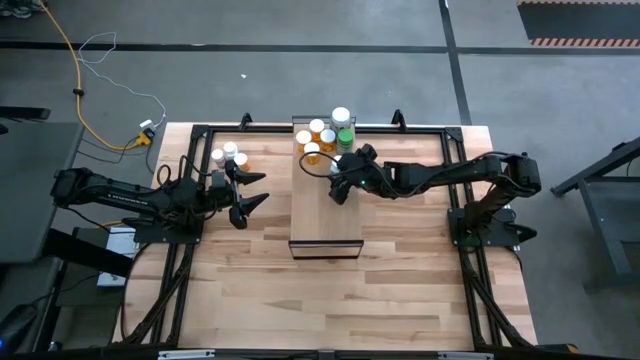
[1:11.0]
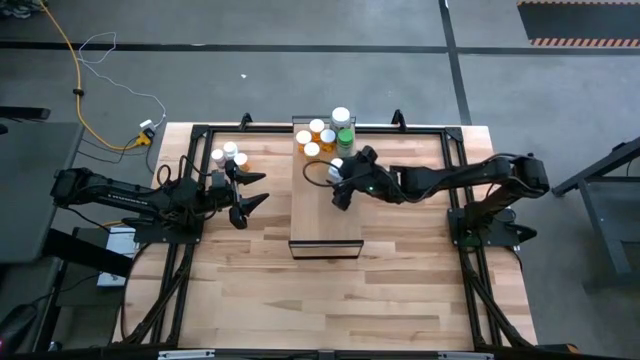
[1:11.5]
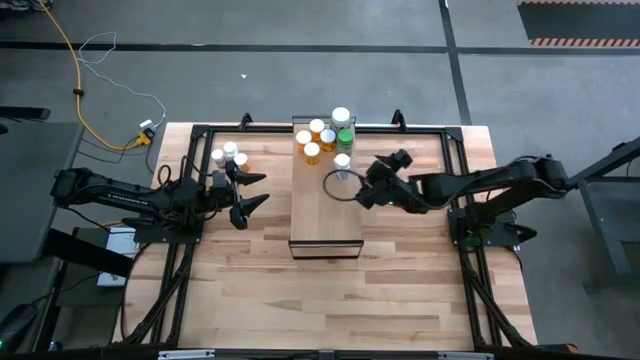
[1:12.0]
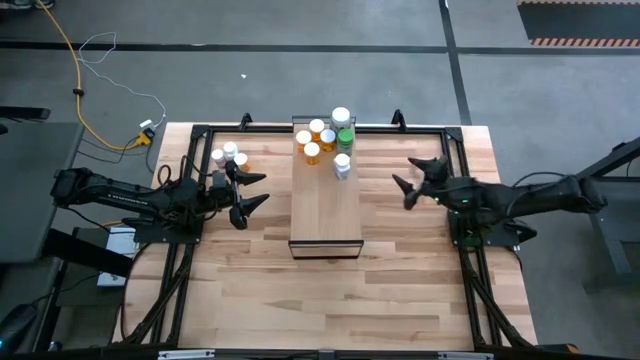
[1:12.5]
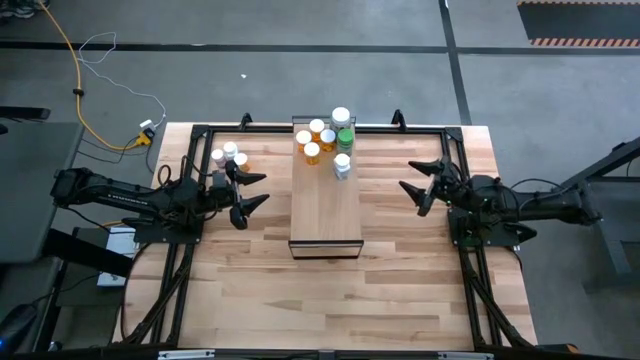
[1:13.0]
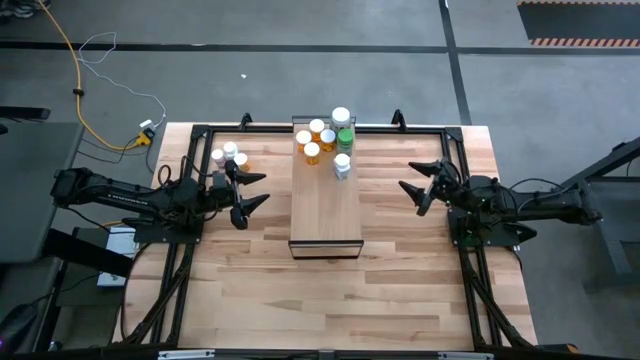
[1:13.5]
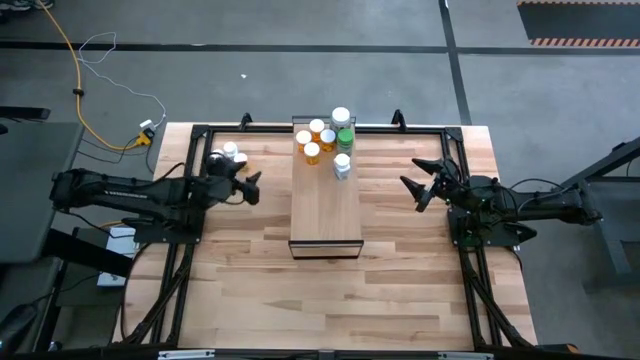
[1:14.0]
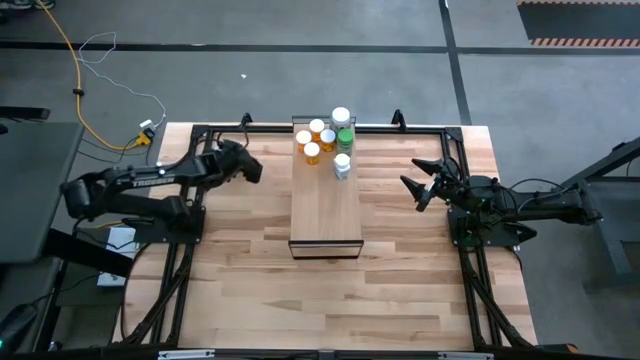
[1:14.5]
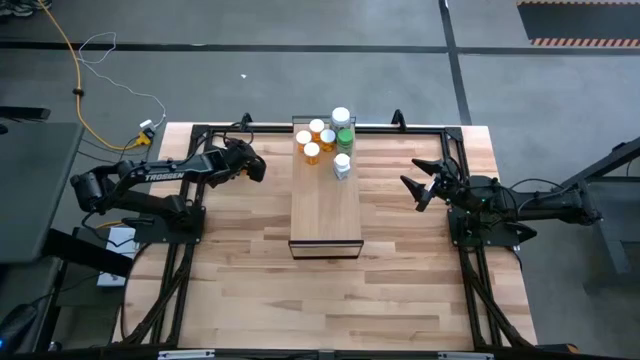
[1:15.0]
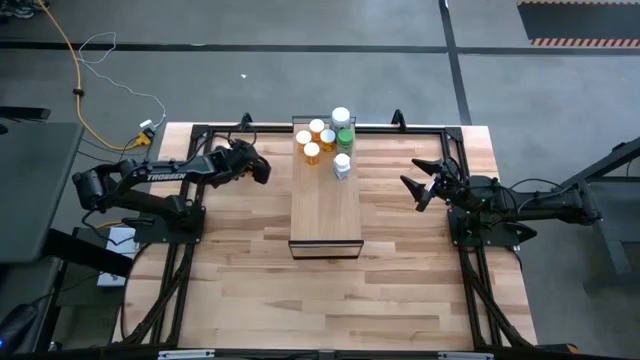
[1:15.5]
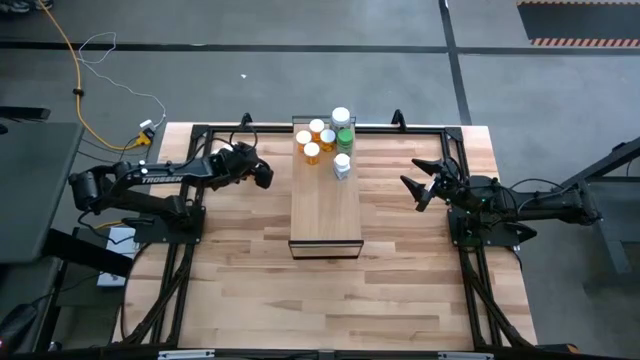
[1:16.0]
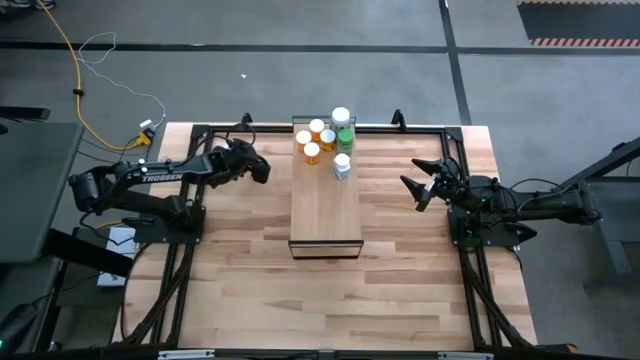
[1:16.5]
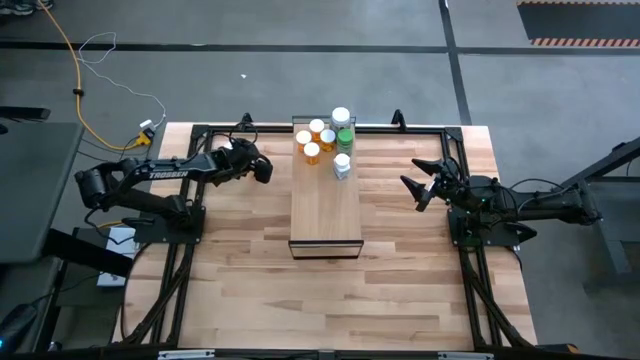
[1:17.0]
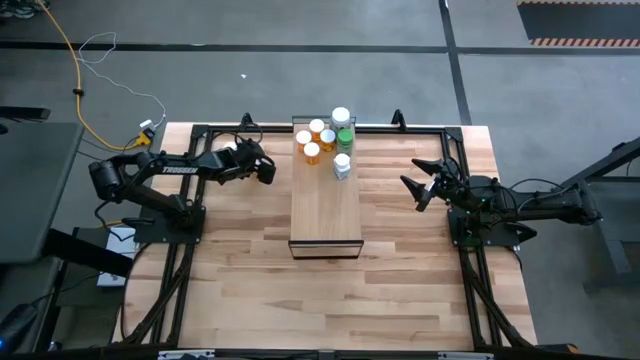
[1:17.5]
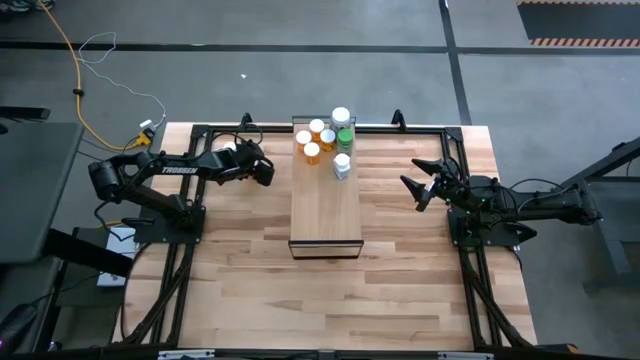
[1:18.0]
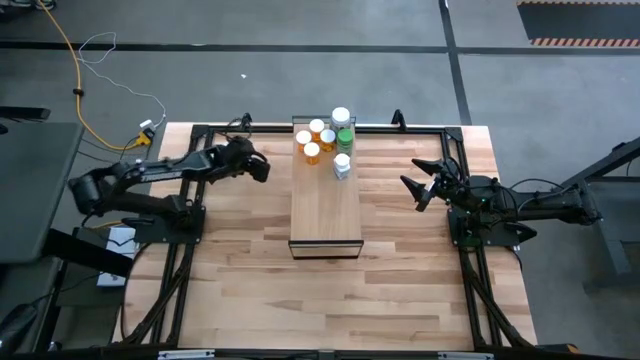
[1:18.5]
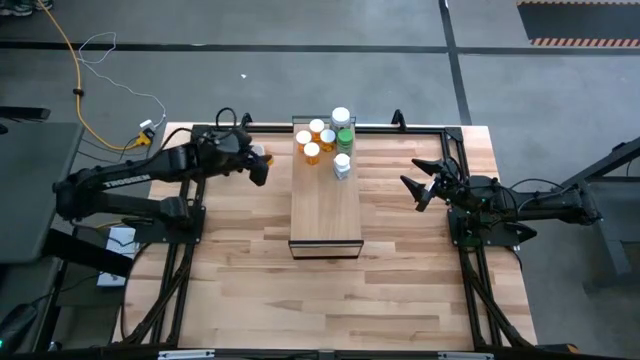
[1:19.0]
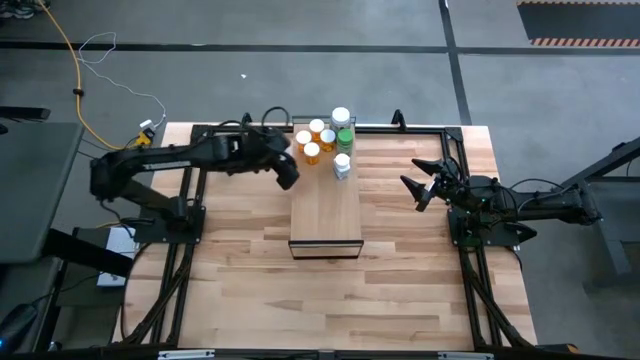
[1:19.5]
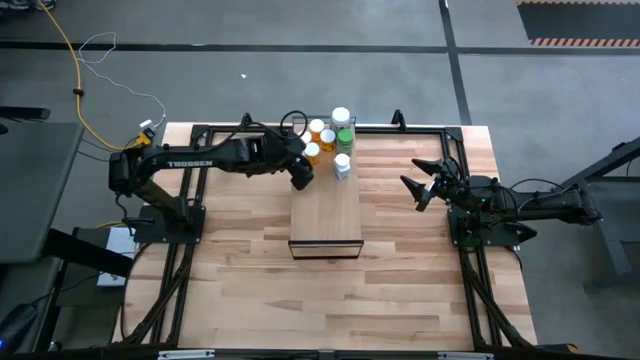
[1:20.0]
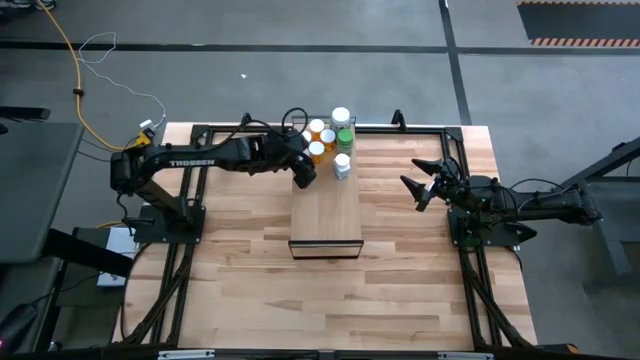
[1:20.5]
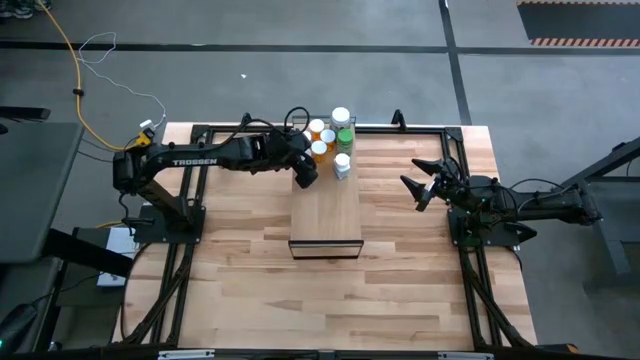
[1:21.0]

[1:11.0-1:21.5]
Task: Pick and place medicine bottles onto shelf by color
Put the yellow pill bottle on the shelf

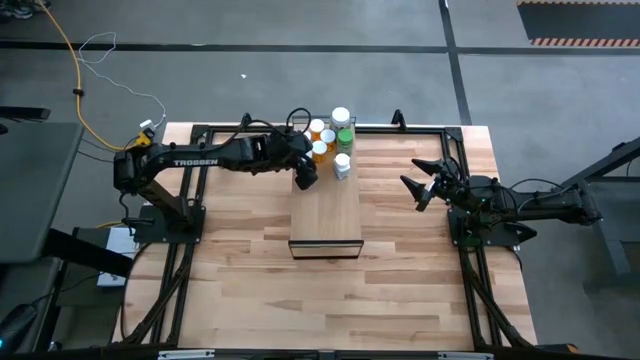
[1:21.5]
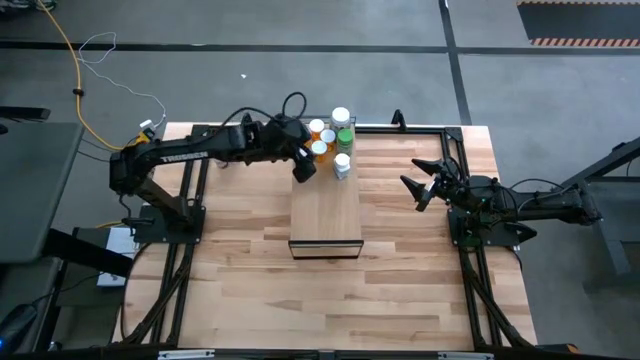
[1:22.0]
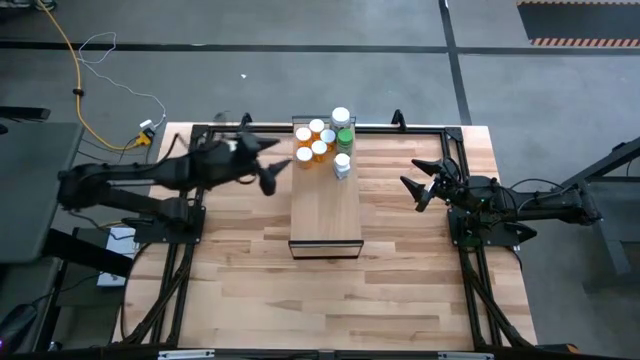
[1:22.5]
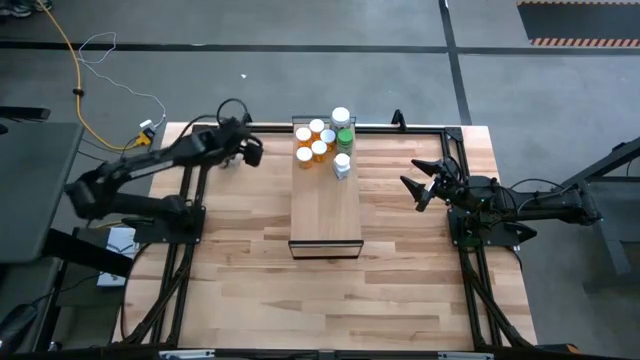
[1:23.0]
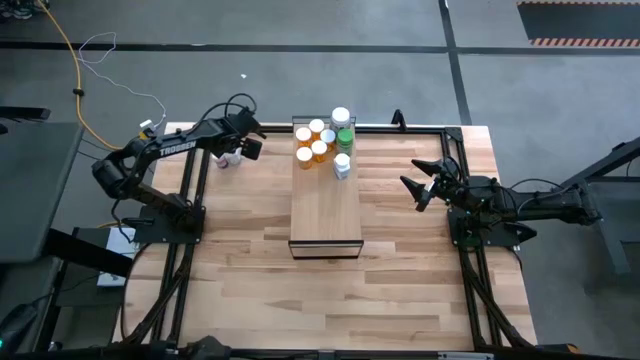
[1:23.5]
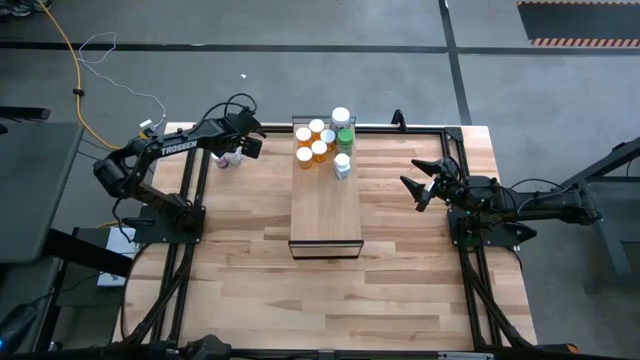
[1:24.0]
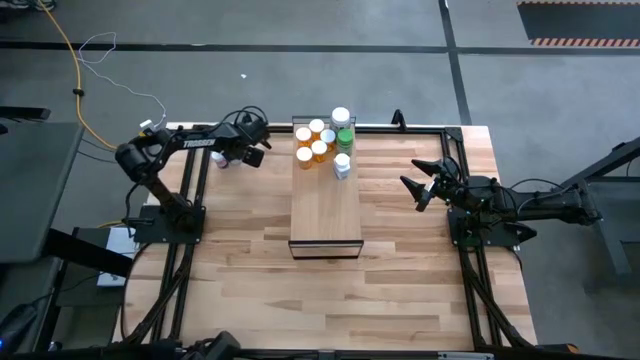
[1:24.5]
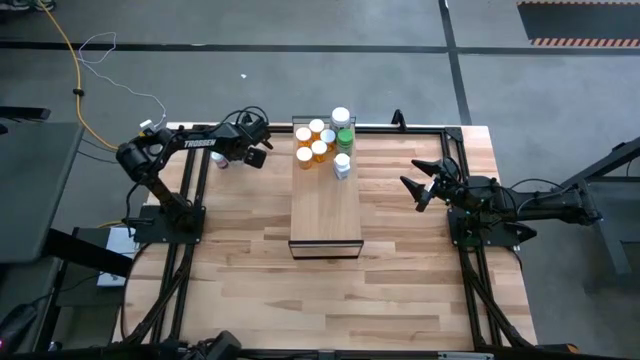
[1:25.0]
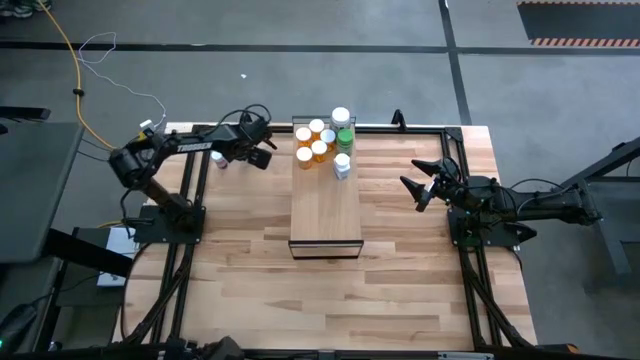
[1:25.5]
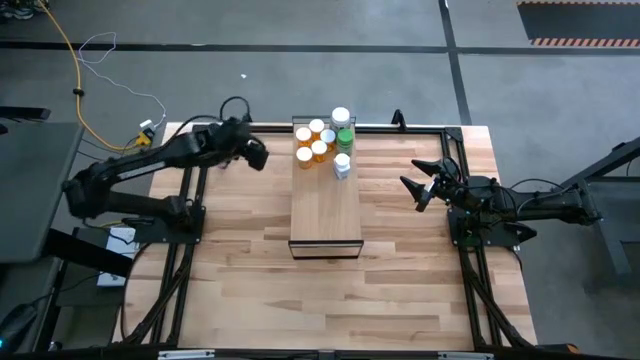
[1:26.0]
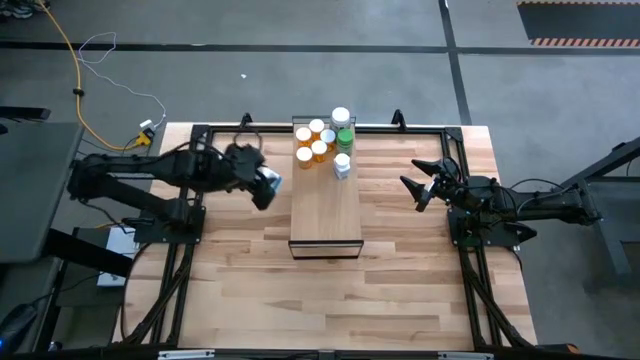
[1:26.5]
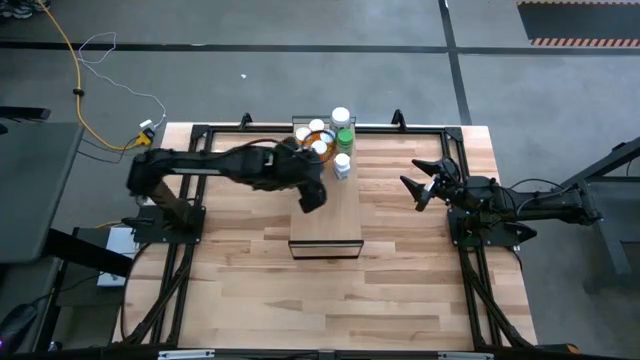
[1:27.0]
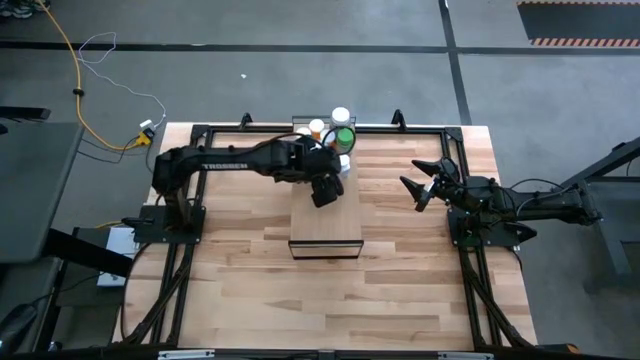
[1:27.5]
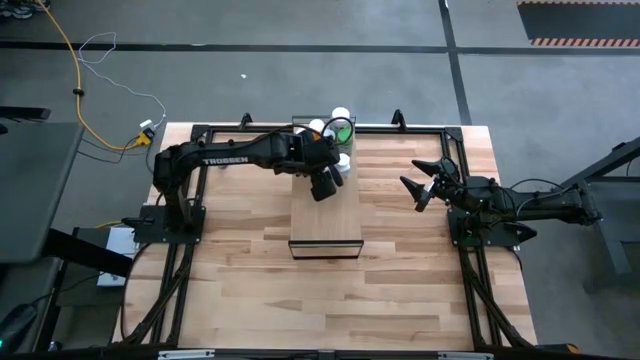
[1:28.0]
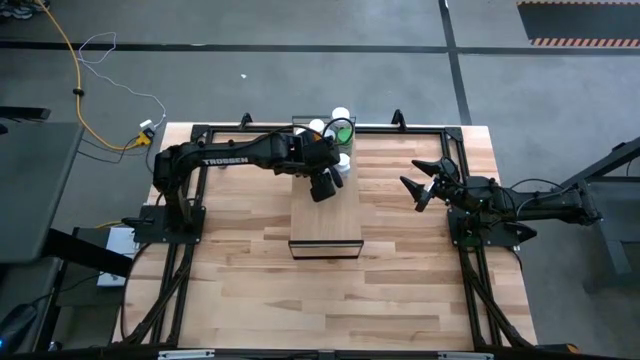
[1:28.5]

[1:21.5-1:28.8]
Put the right white pill bottle on the shelf

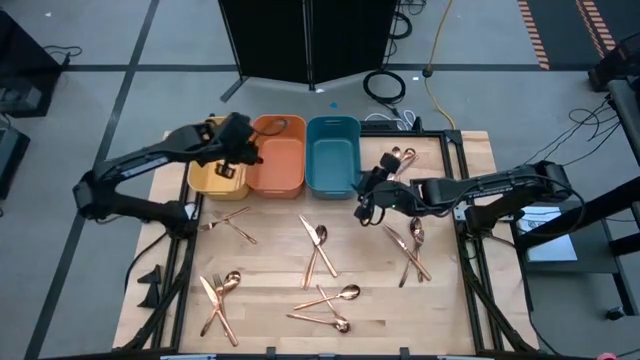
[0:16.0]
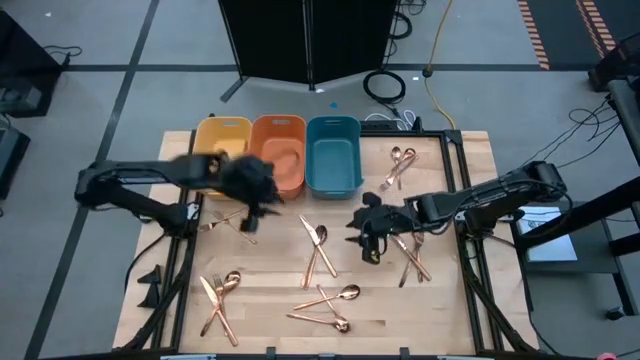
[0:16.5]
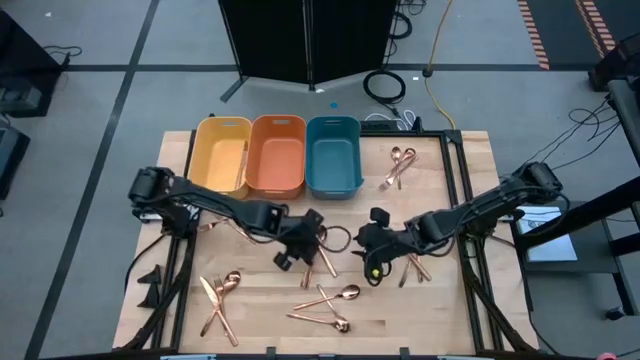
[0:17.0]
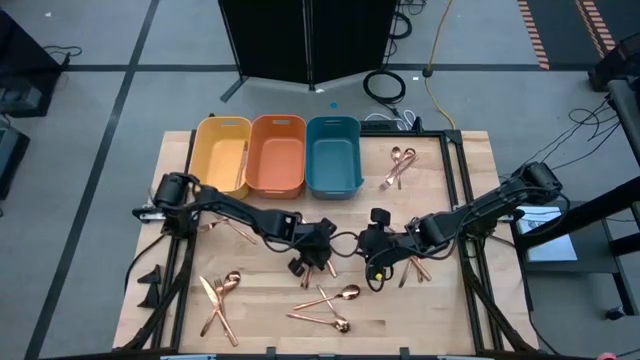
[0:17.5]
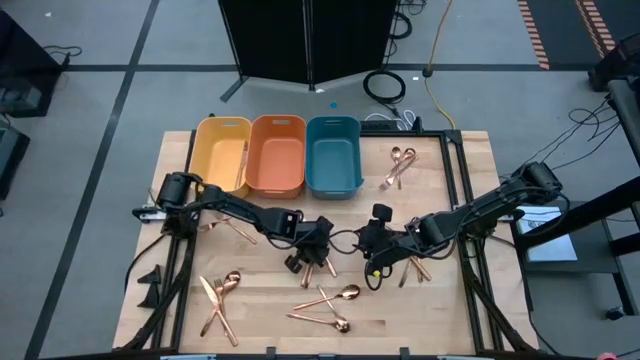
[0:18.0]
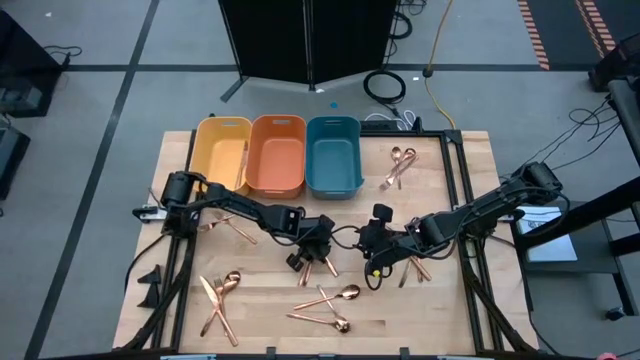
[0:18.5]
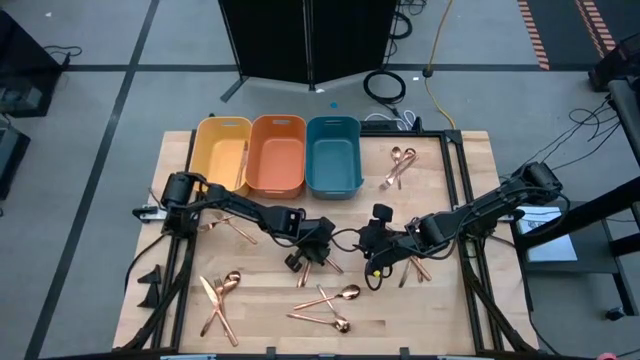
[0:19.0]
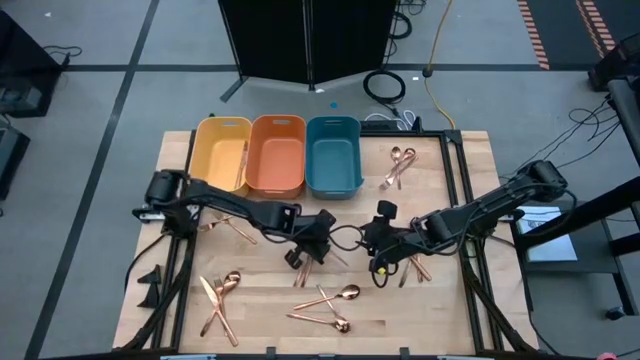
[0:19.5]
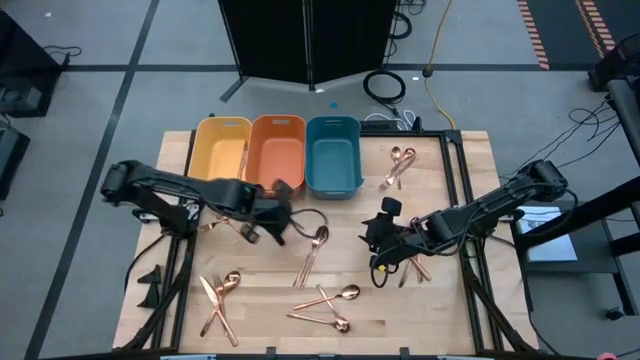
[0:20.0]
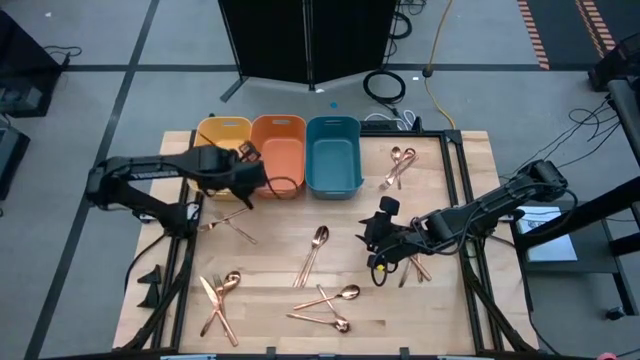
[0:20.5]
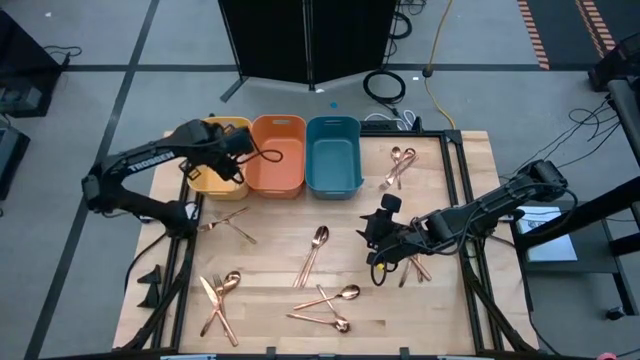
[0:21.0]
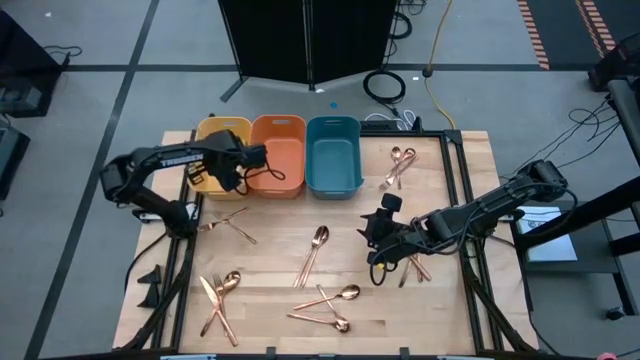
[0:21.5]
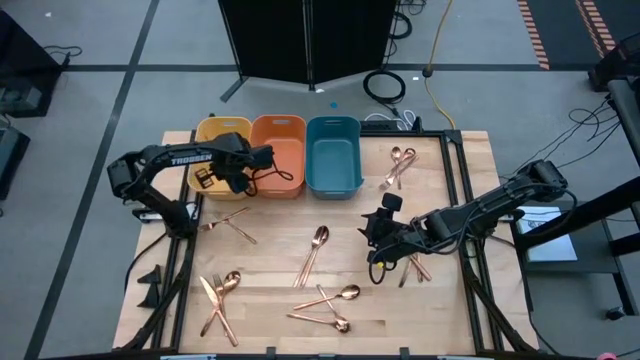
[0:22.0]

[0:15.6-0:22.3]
Task: Sort silverware
Put the gold table knife into the yellow bin
